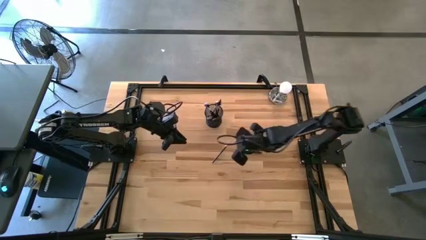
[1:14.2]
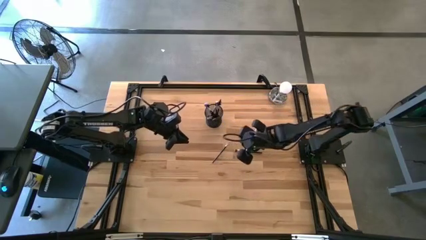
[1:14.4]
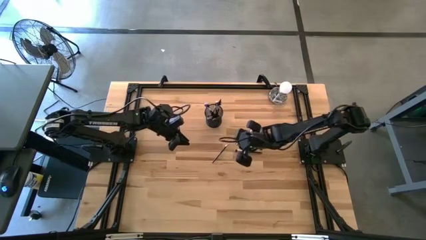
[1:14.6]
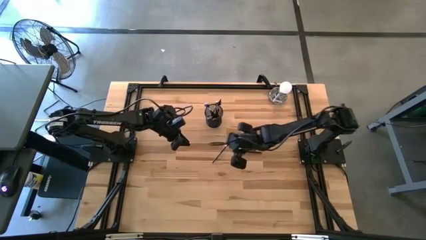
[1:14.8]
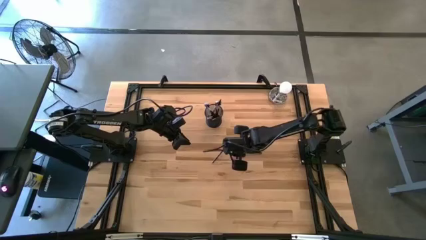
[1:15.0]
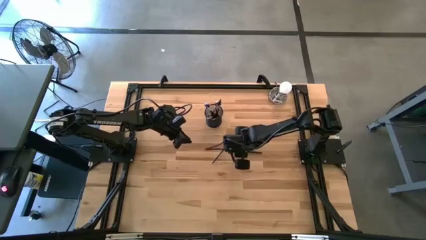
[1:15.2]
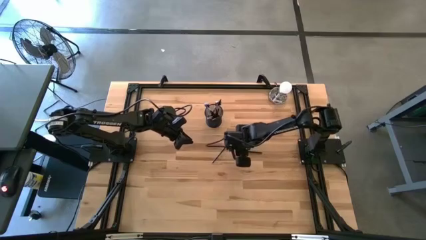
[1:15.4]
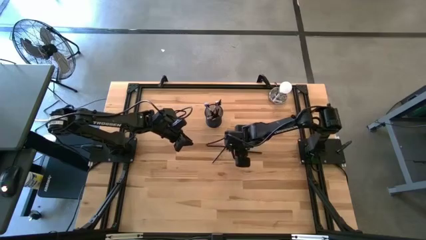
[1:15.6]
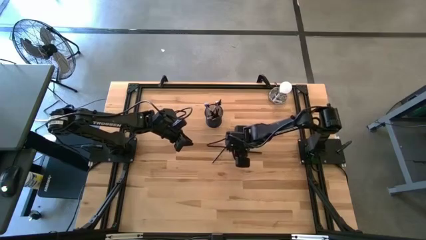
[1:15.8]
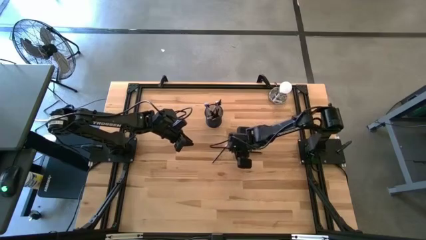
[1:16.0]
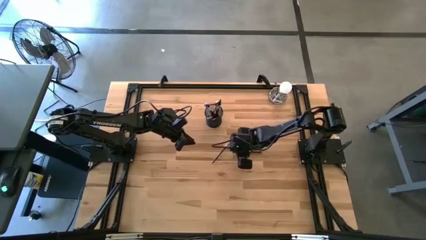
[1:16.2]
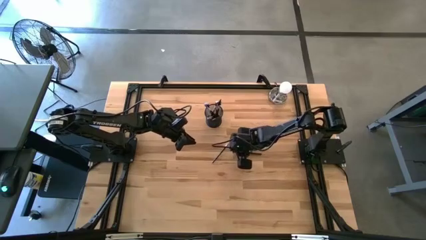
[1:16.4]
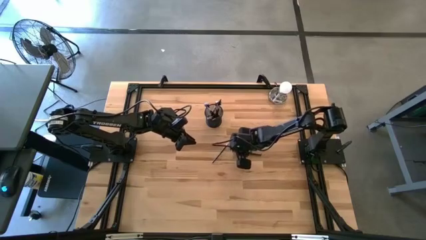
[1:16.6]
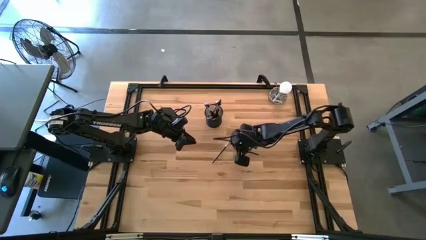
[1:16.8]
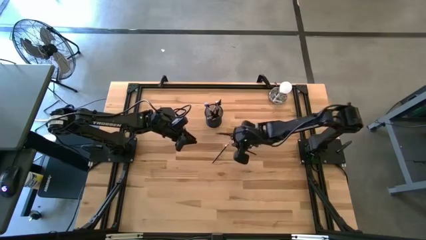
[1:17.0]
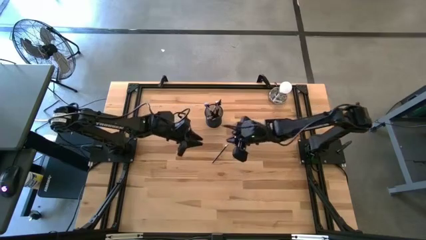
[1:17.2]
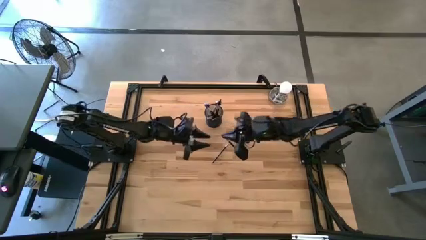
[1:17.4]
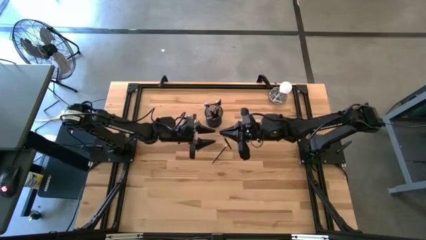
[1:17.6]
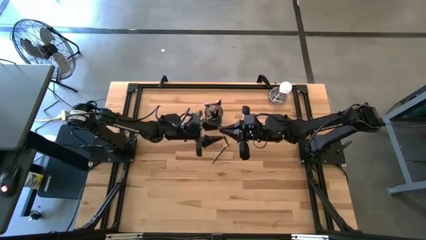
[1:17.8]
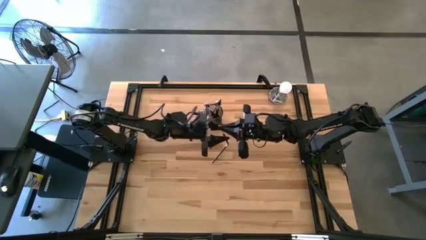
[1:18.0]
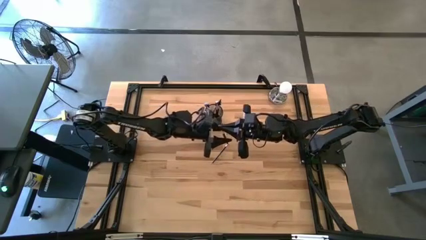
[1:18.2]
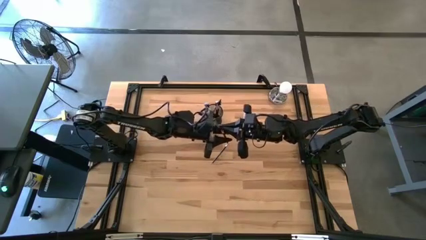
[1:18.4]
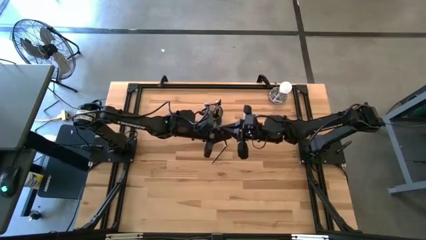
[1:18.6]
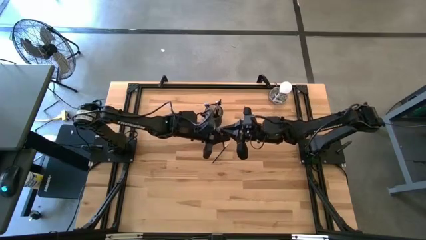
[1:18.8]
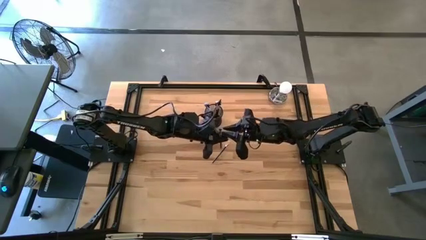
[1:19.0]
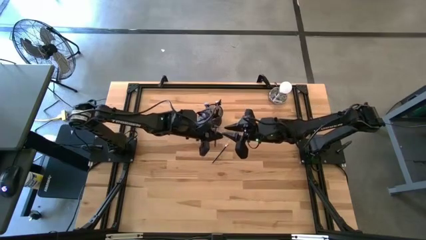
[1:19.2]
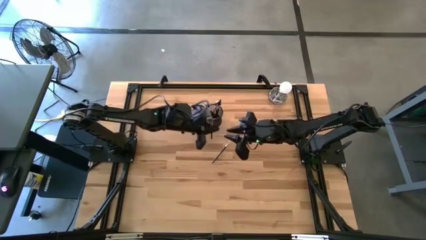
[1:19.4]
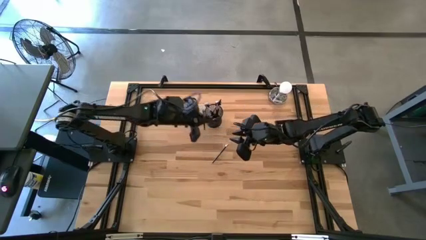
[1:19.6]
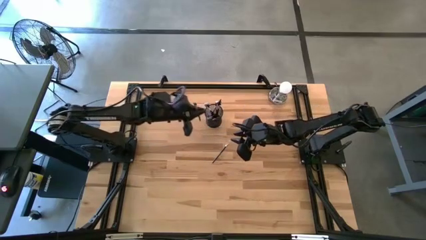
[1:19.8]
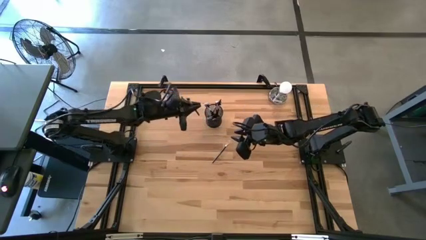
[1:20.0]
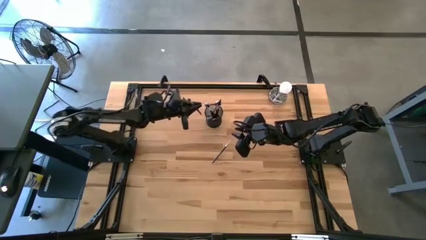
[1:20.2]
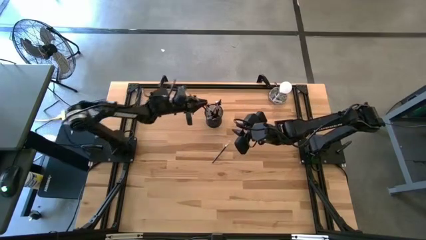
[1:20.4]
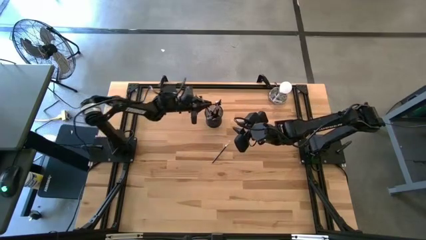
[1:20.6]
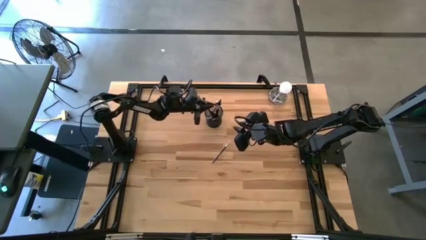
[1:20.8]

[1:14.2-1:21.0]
Task: Pick & Place Makeup Brushes
Put the small white make-up brush into the black container

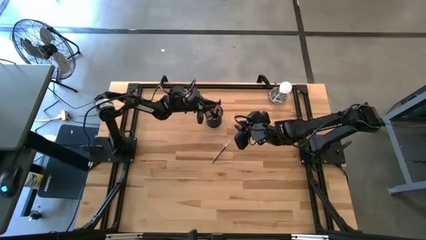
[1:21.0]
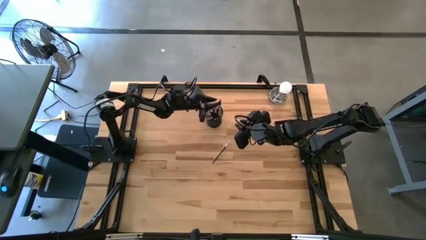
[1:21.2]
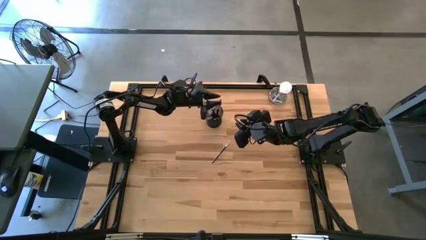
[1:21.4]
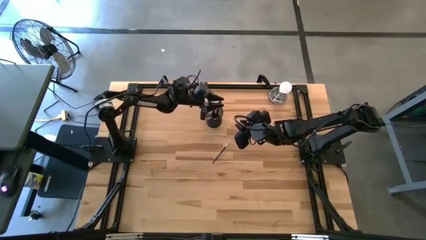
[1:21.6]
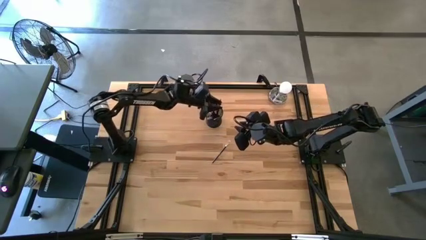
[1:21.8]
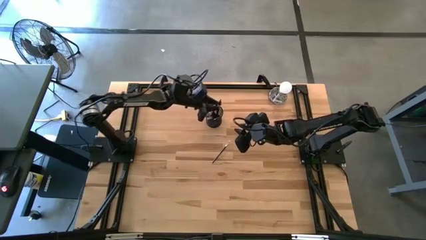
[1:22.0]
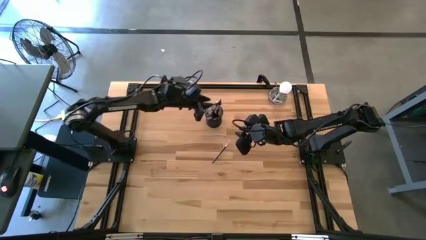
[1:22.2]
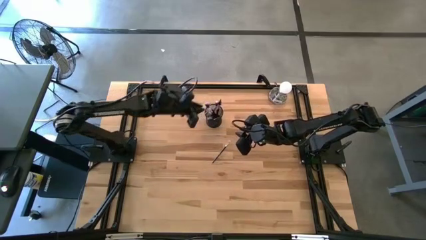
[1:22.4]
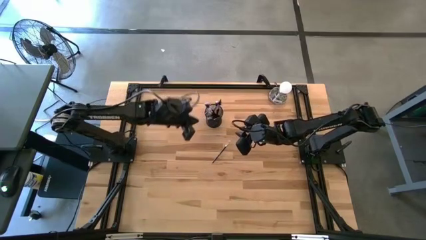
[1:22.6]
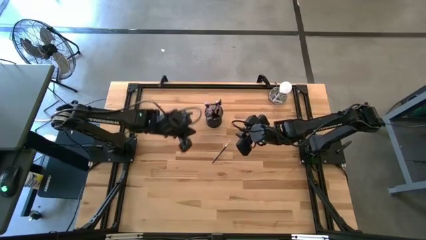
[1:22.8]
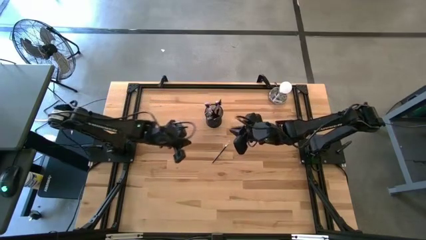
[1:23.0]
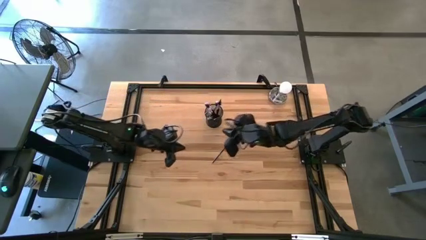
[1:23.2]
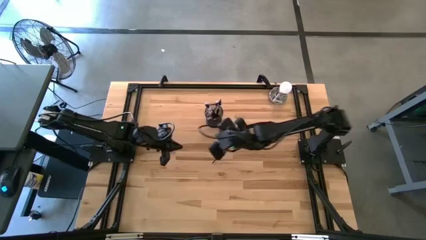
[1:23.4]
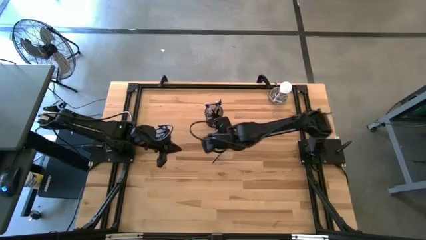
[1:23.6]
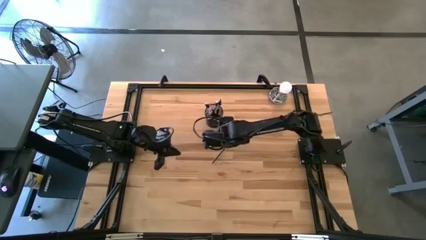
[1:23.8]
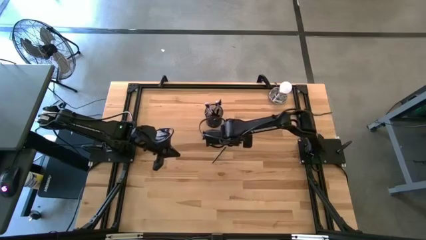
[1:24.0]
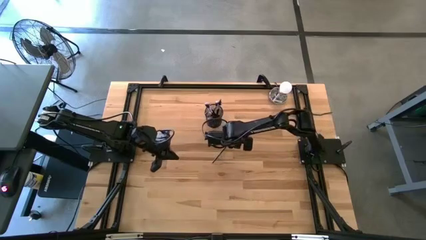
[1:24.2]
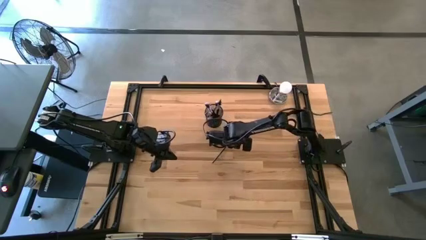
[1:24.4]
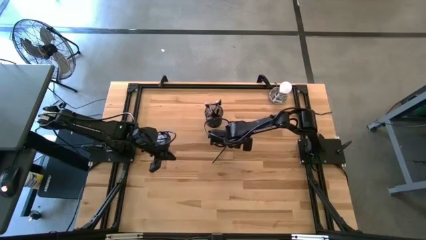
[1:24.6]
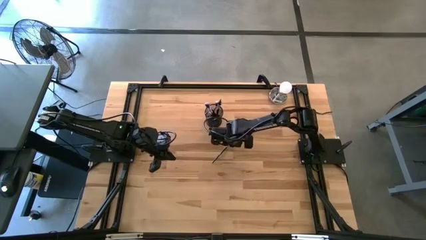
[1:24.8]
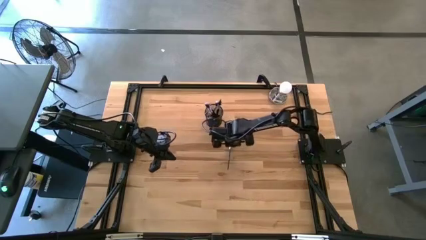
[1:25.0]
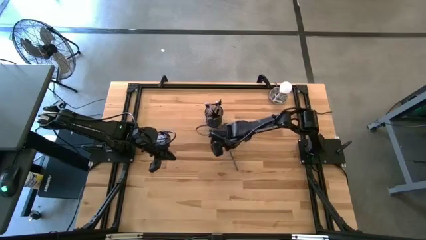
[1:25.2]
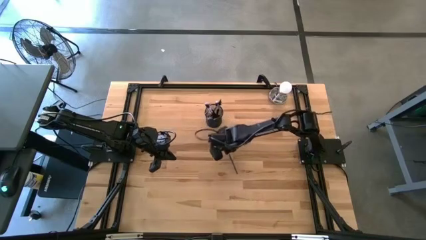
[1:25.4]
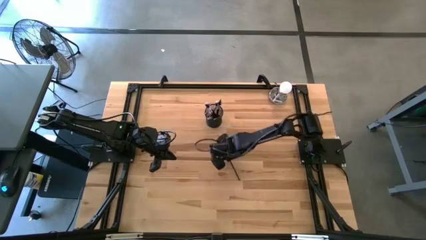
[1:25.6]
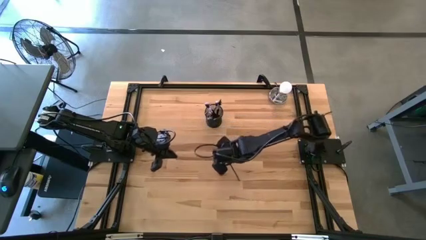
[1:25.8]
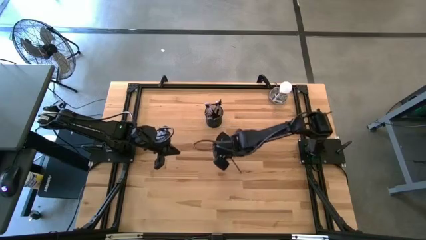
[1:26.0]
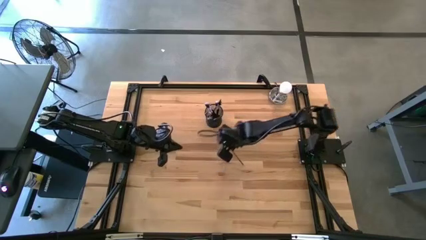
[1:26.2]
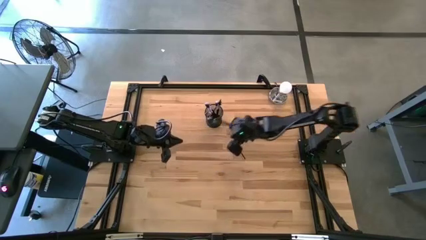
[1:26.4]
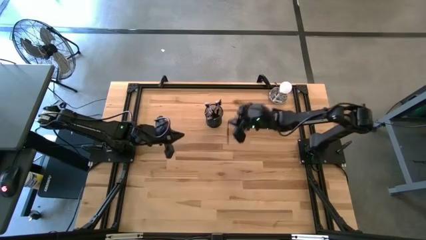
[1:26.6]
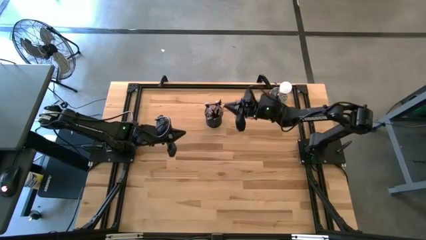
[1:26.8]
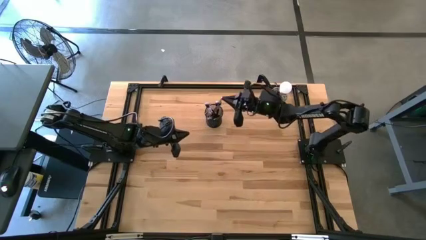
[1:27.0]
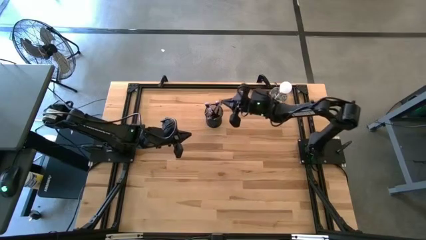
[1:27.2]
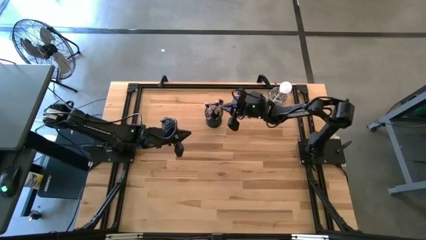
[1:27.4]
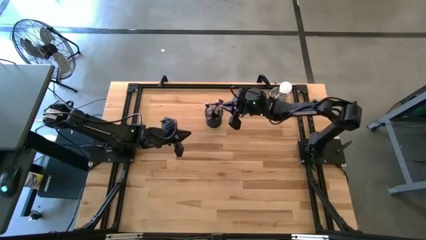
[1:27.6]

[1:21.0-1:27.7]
Put the small white make-up brush into the black container
